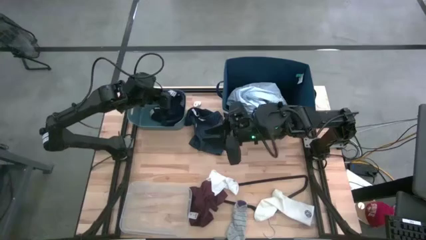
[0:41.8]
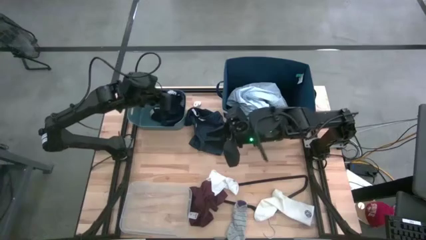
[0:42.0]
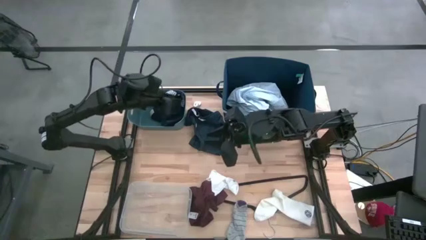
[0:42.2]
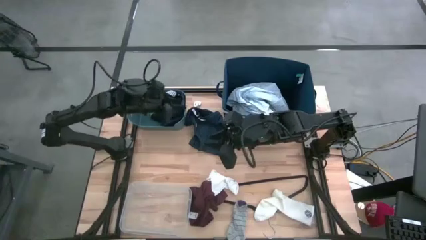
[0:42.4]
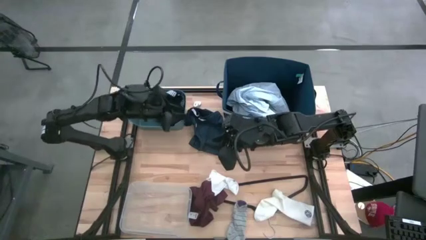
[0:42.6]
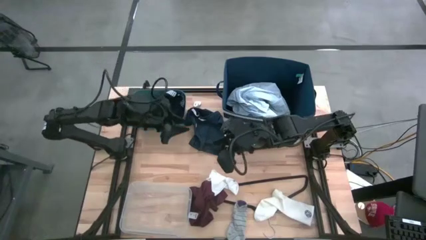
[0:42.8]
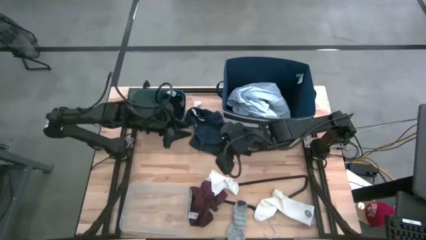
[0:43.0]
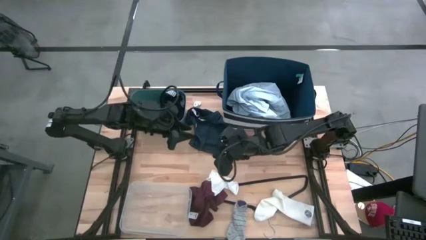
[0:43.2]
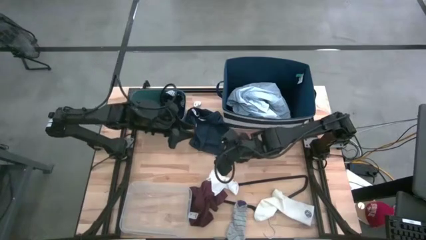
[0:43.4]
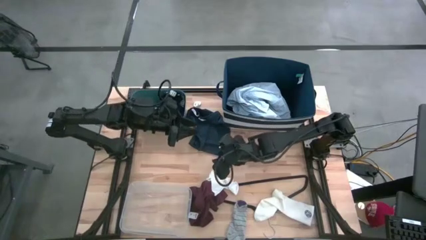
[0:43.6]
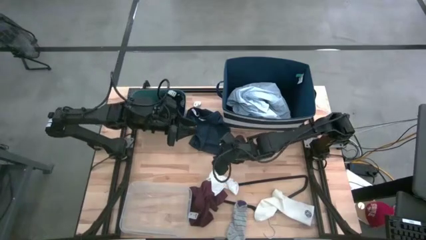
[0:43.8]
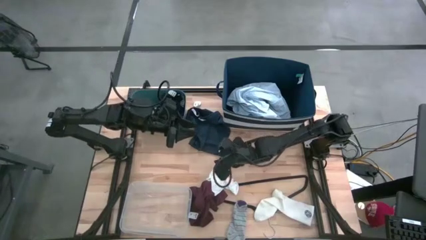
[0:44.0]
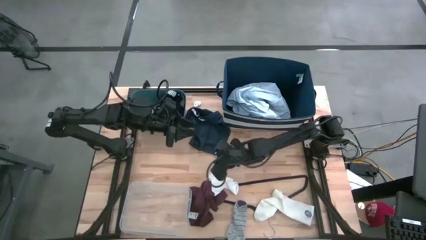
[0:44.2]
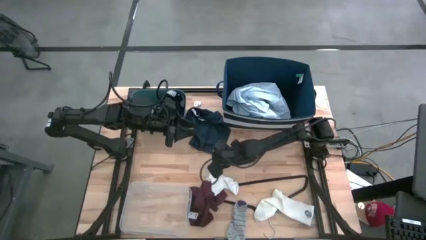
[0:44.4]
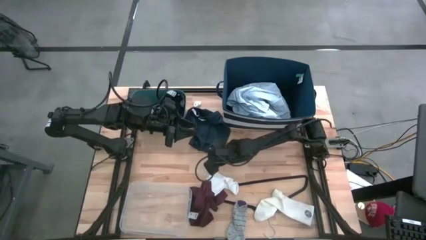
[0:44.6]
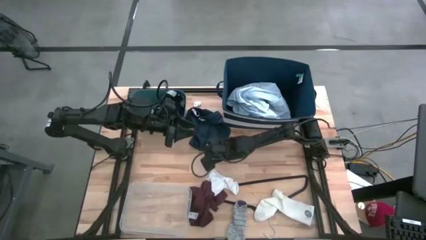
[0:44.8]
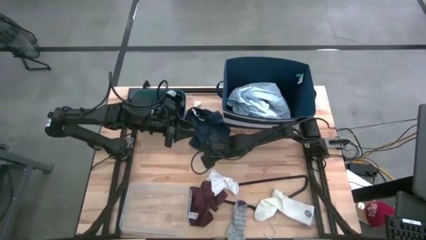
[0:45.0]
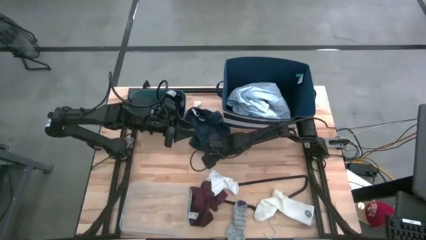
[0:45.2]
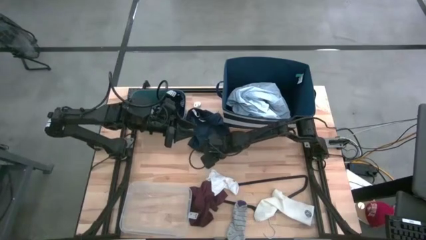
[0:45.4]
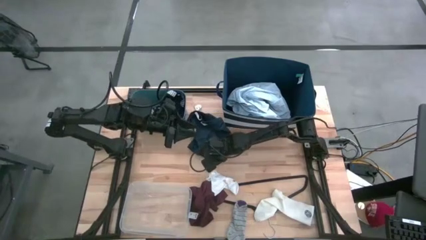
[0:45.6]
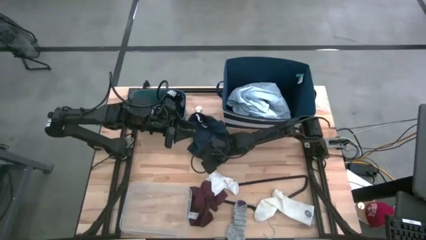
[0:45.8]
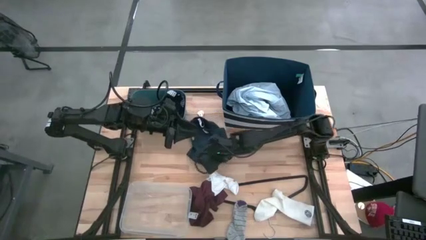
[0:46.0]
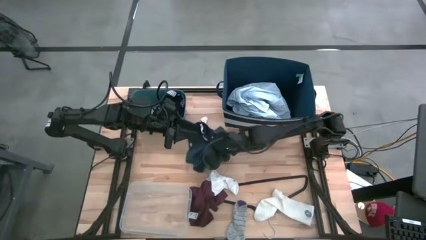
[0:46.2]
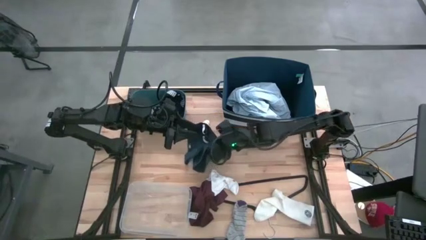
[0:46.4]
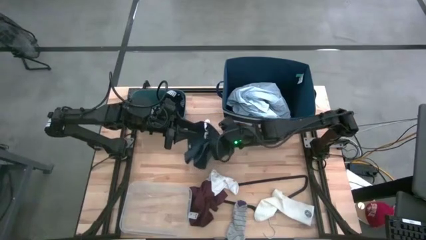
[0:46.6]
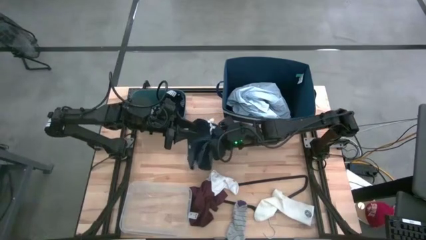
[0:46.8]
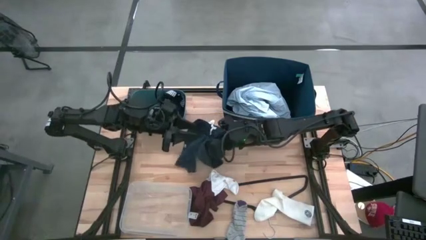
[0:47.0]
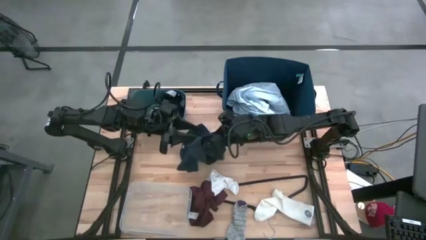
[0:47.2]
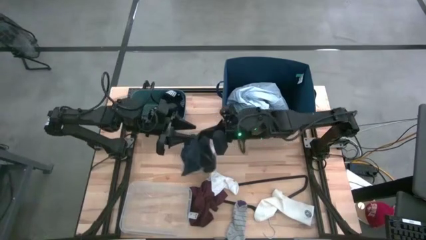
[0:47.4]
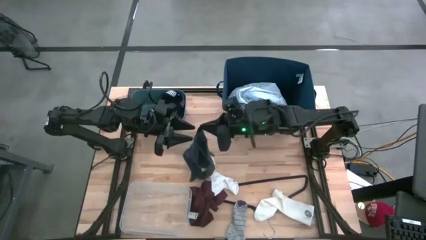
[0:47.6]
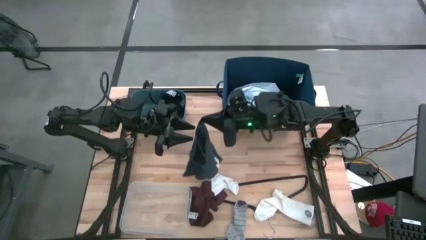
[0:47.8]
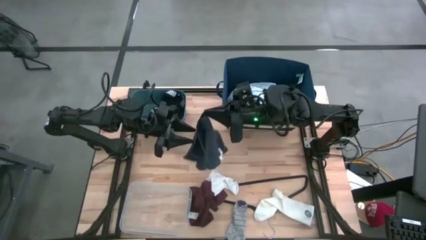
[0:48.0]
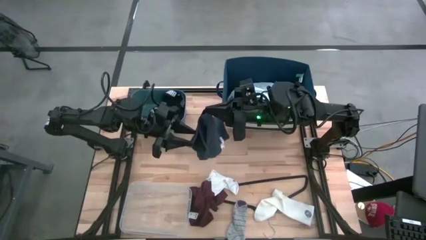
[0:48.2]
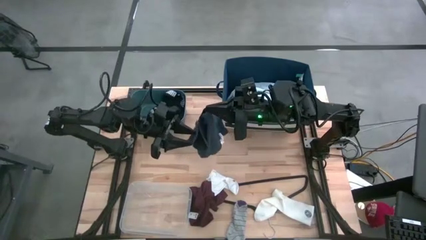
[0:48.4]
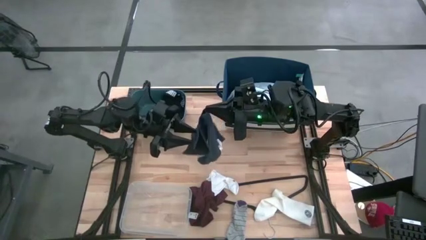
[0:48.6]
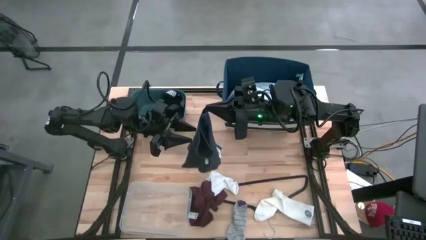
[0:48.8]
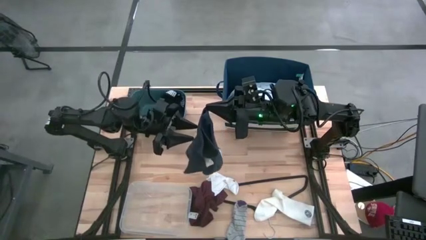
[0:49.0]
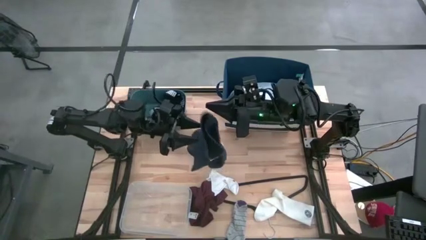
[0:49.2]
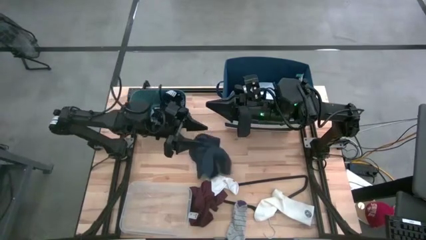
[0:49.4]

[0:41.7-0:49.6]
Task: Pick & Place Cloths
Put the dark blue pants into the green bin

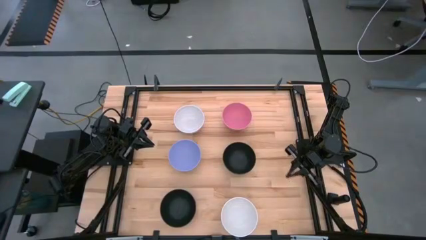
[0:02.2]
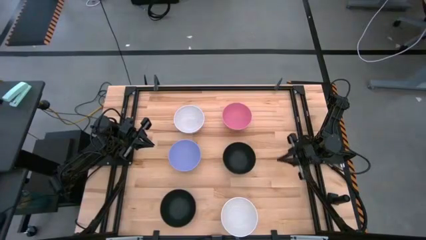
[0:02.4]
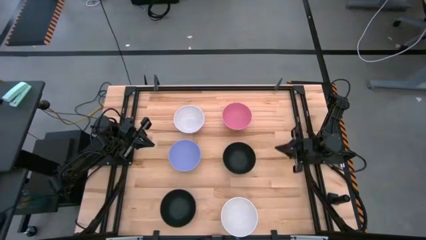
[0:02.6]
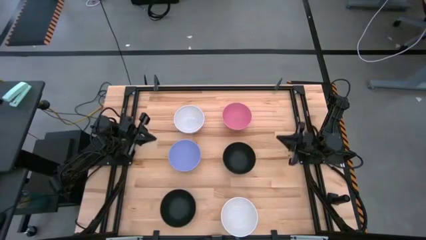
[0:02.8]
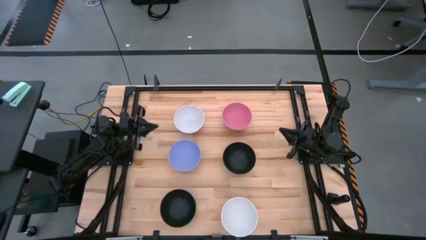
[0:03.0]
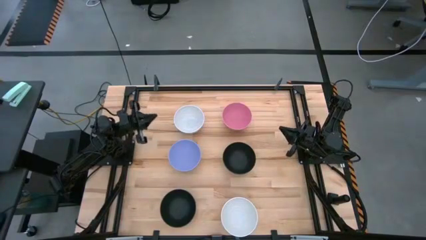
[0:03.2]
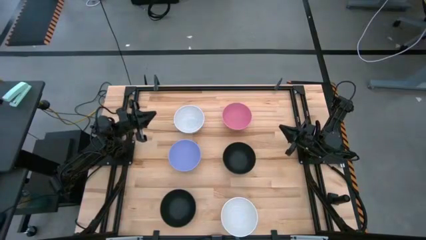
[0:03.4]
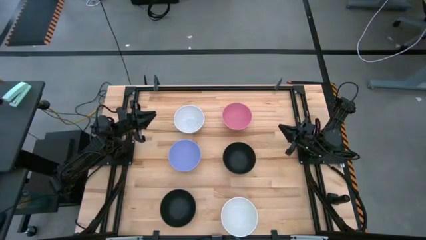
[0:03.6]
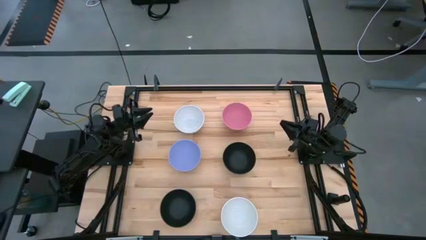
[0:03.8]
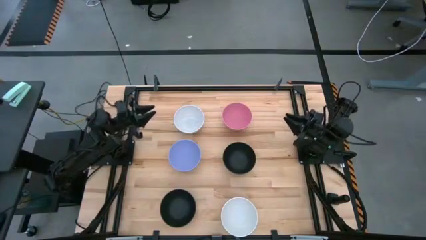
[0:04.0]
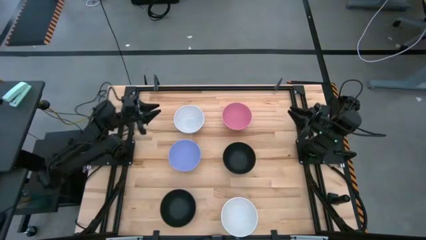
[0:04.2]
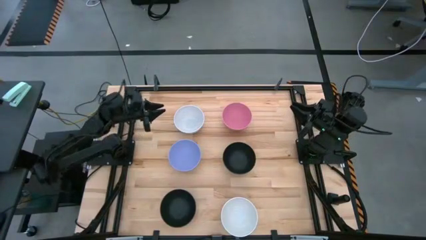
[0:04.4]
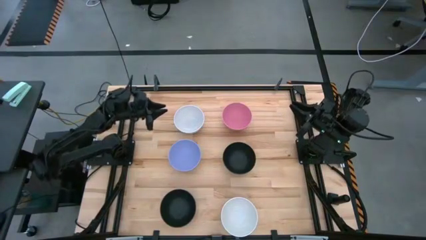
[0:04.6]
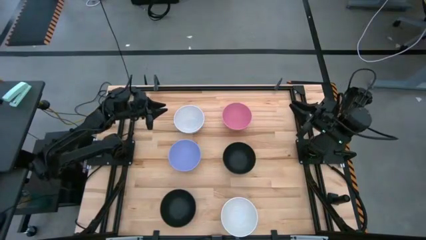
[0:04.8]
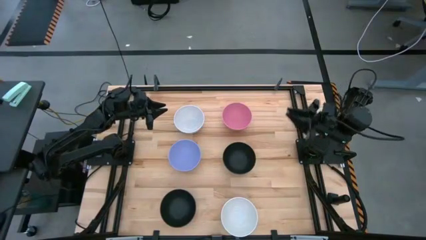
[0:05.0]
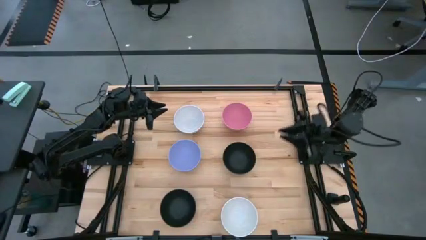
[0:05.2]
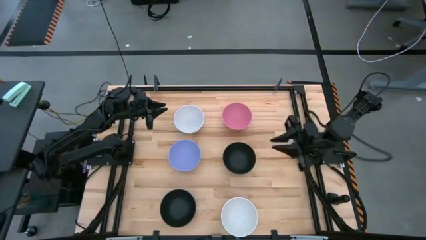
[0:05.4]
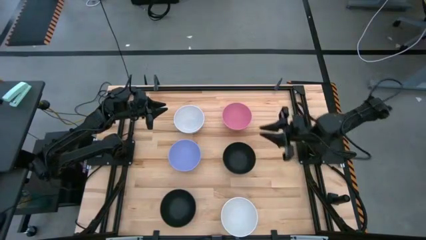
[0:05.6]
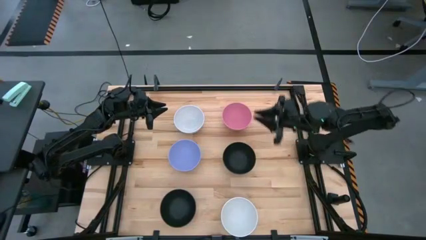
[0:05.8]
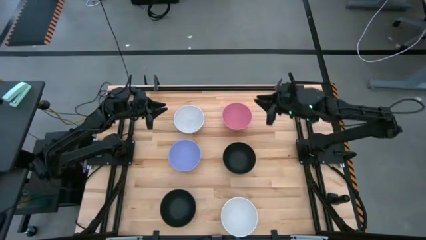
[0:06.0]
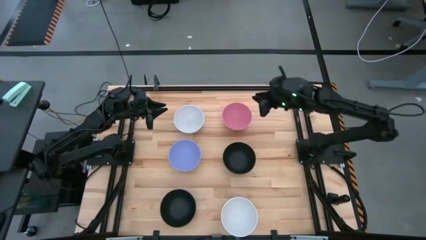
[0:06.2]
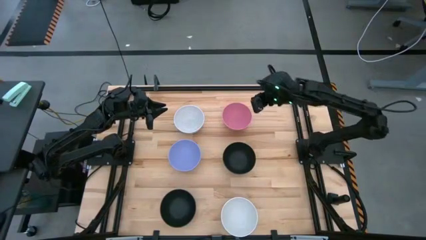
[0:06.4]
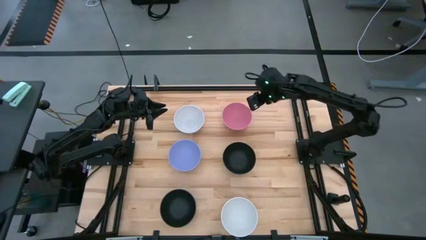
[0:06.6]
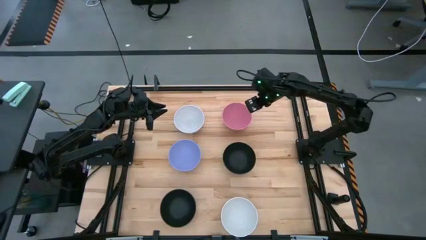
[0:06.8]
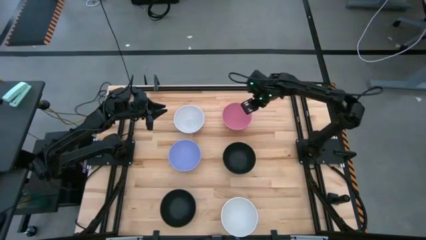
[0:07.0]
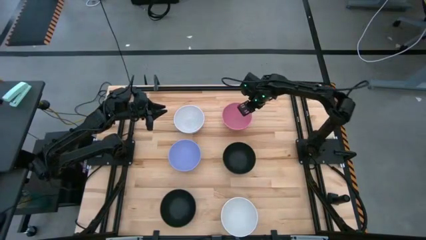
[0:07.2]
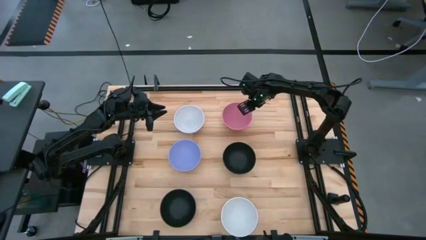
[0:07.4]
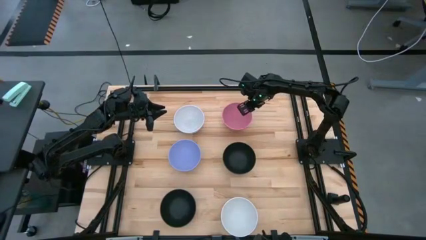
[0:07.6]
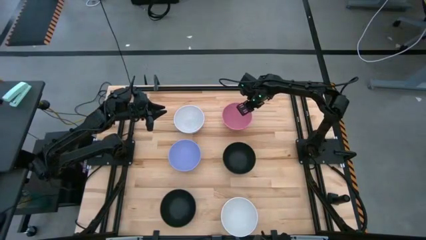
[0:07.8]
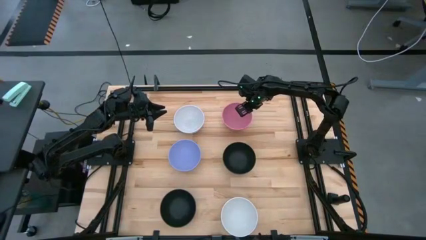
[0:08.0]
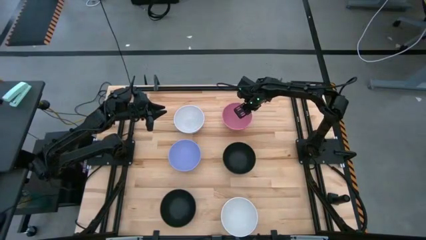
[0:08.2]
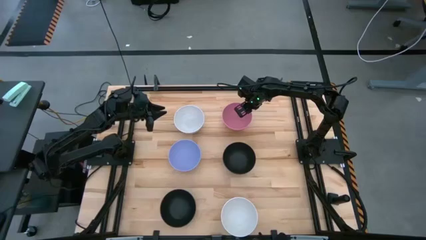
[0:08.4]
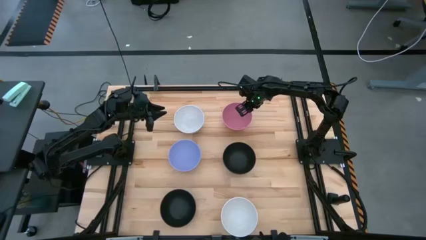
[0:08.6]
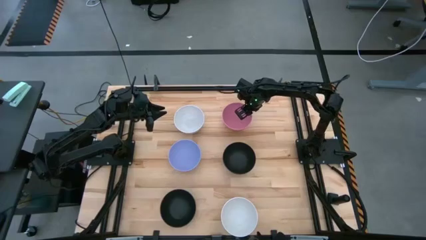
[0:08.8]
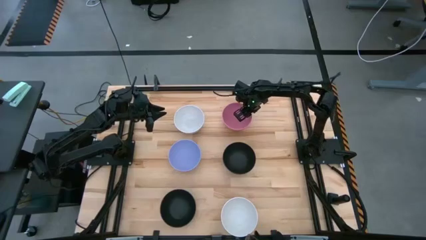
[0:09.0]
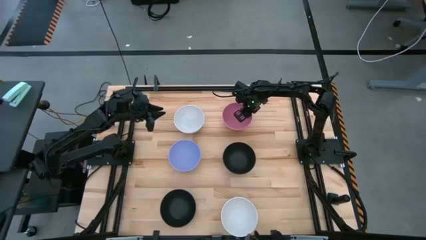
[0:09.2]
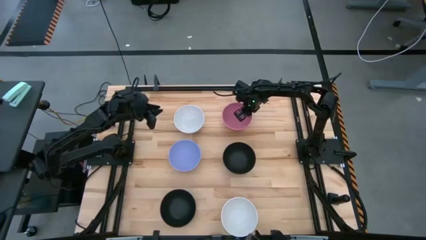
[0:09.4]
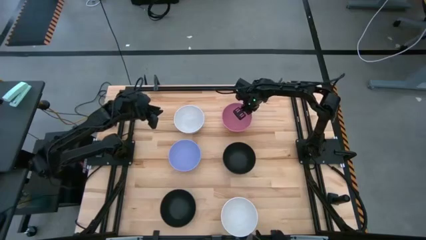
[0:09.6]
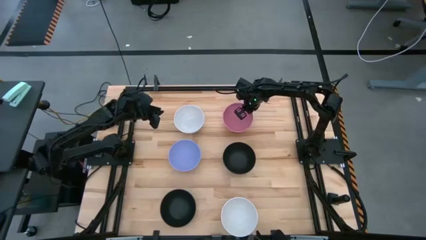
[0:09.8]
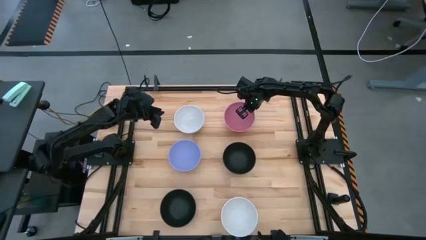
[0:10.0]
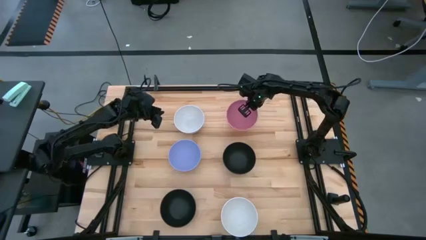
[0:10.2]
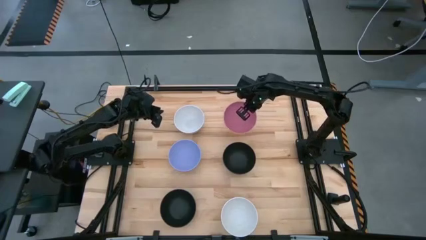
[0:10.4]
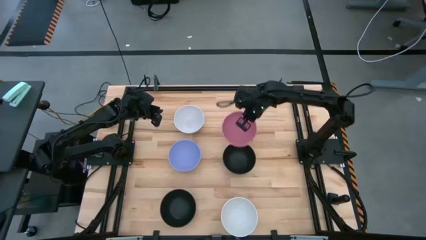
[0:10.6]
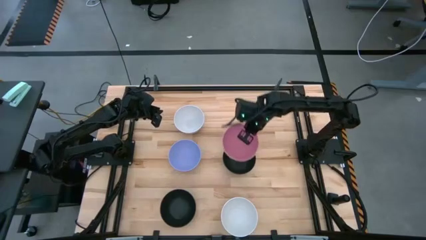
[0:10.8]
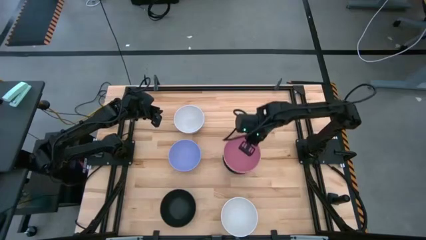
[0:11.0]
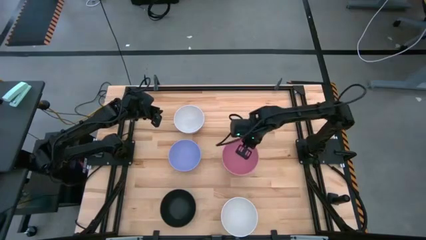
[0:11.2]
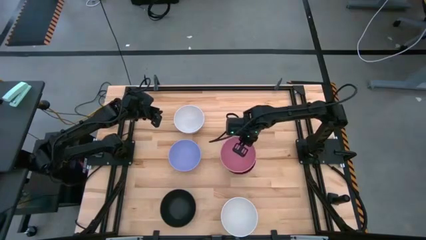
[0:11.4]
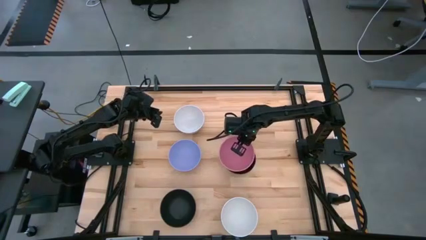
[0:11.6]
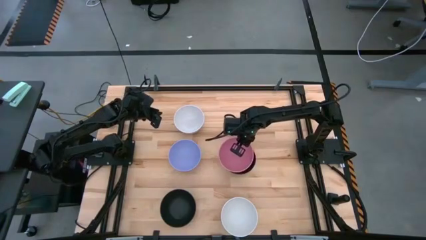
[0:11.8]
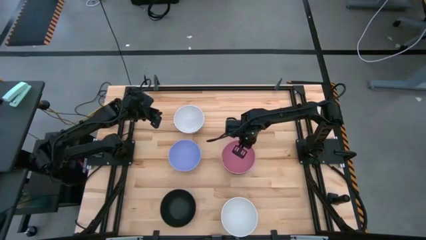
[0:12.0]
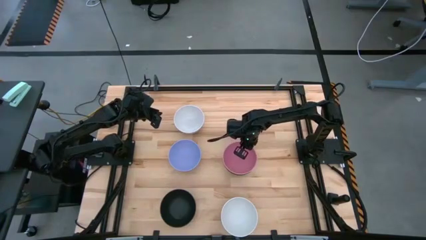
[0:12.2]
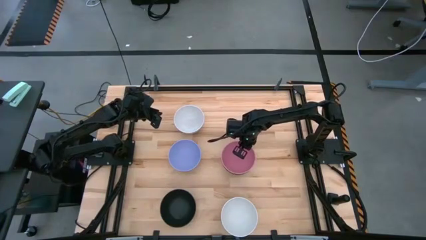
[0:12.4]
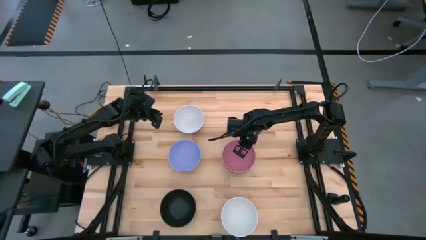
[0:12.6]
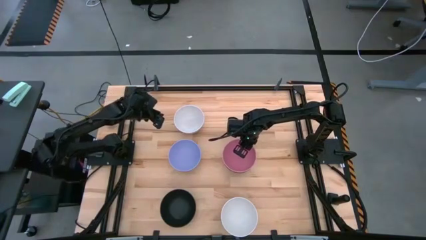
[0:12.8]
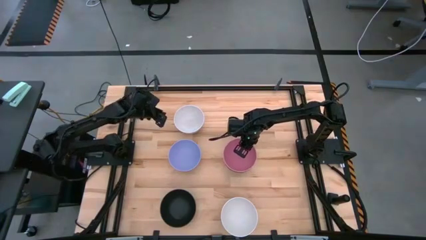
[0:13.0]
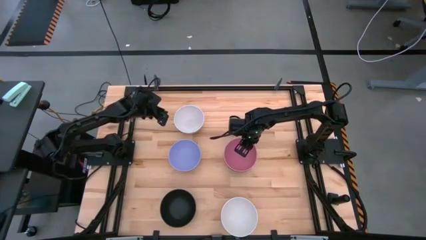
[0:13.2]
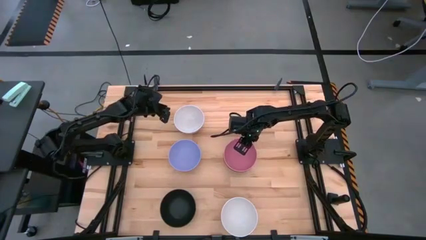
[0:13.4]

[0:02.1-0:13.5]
Task: Nest bowls inside each other
Stack the pink bowl on top of the black bowl
